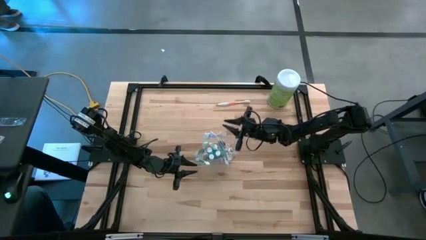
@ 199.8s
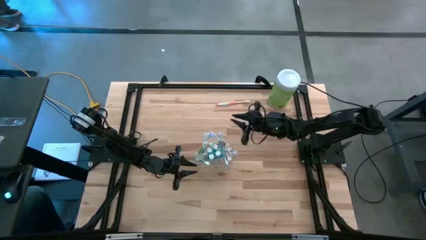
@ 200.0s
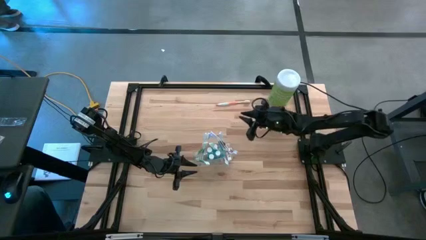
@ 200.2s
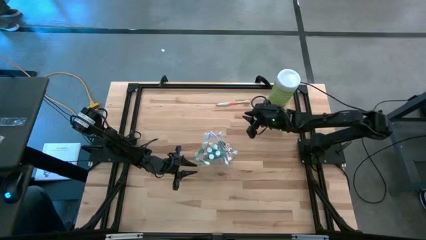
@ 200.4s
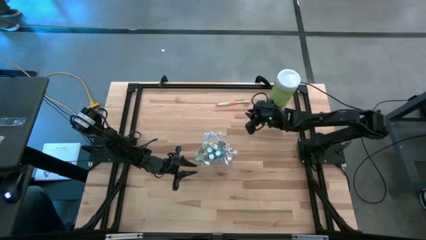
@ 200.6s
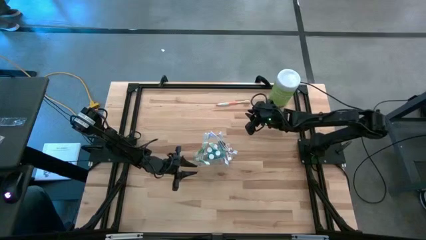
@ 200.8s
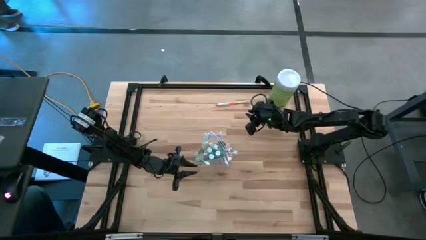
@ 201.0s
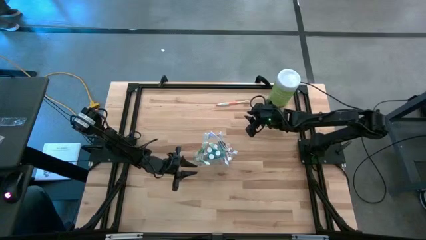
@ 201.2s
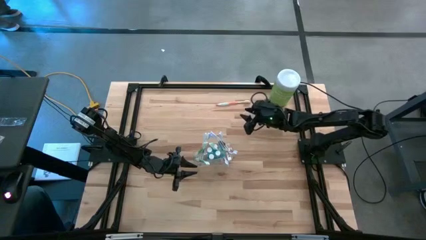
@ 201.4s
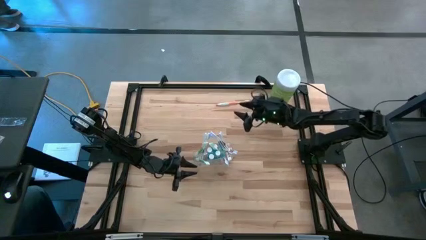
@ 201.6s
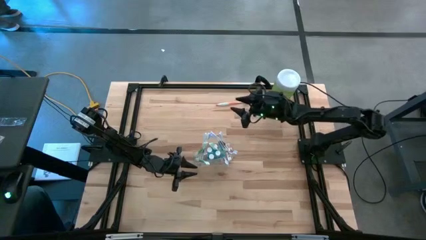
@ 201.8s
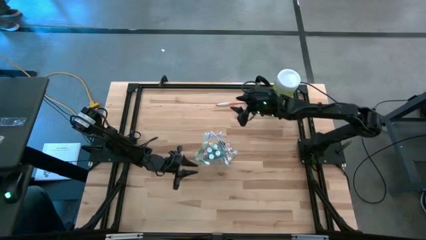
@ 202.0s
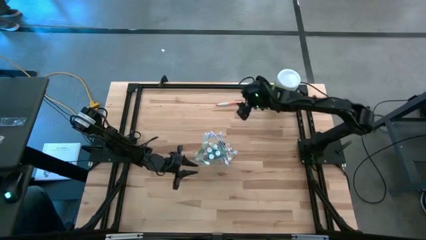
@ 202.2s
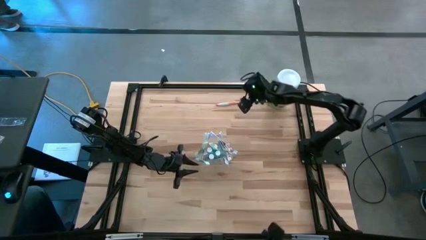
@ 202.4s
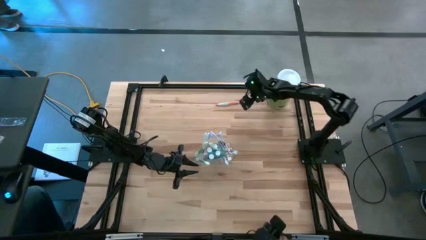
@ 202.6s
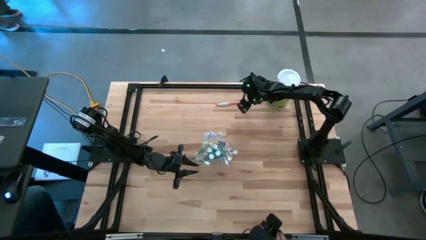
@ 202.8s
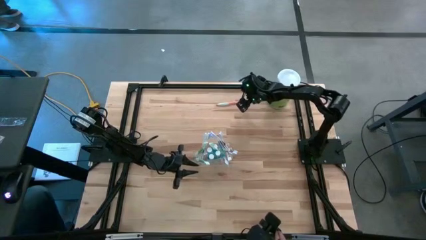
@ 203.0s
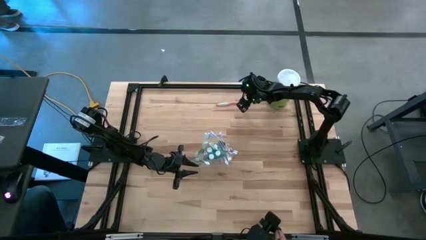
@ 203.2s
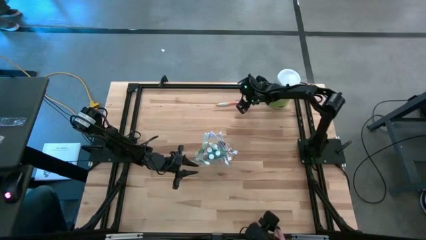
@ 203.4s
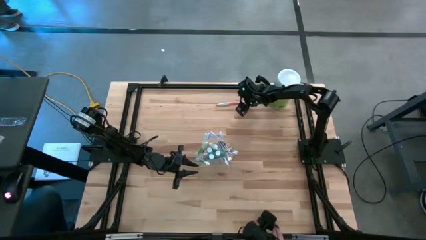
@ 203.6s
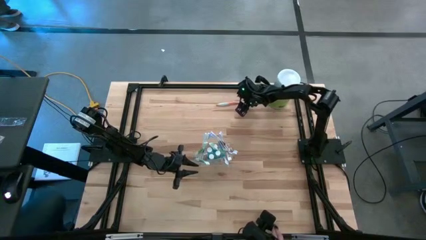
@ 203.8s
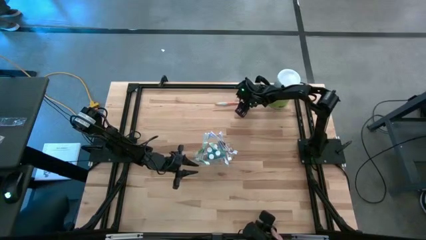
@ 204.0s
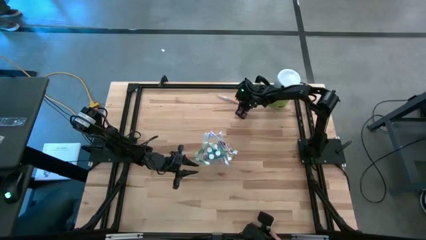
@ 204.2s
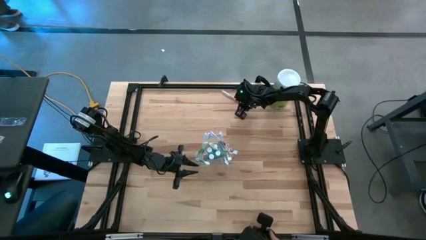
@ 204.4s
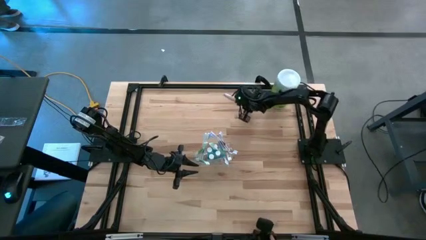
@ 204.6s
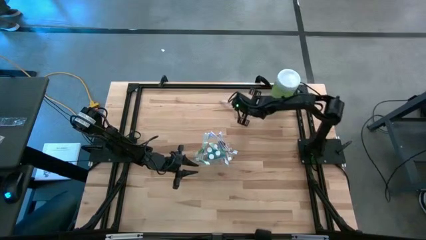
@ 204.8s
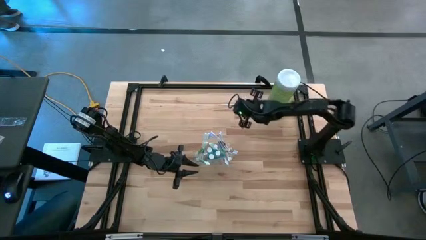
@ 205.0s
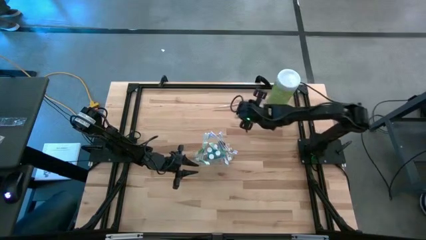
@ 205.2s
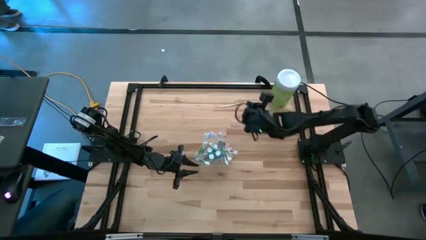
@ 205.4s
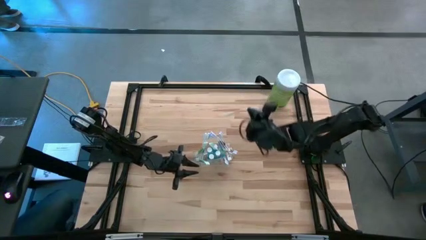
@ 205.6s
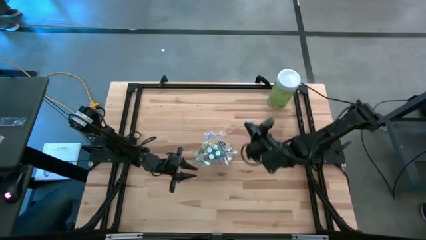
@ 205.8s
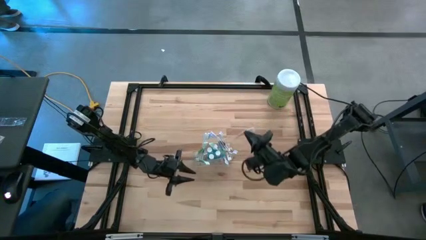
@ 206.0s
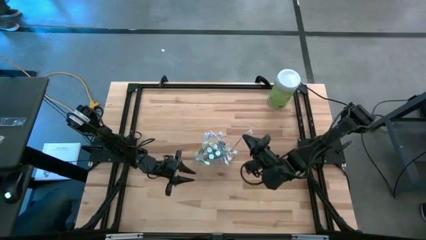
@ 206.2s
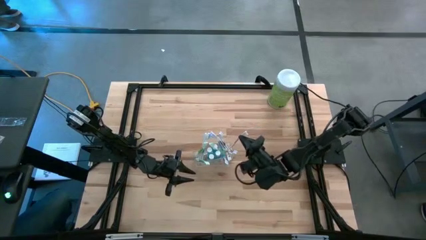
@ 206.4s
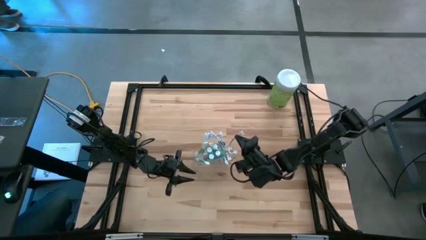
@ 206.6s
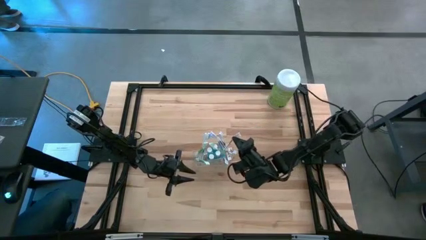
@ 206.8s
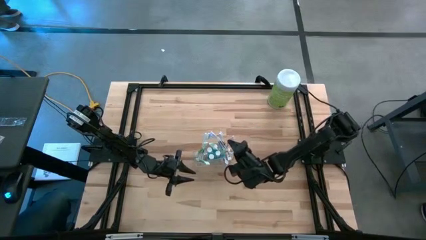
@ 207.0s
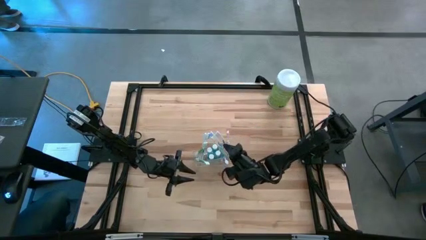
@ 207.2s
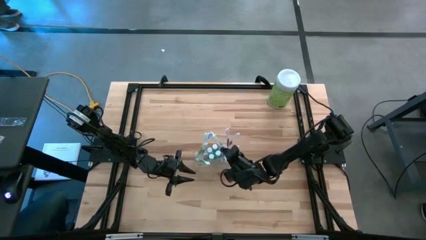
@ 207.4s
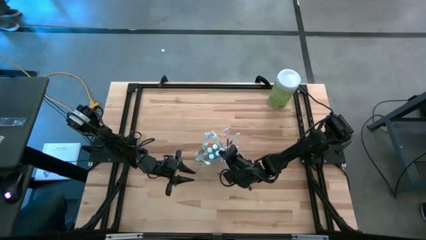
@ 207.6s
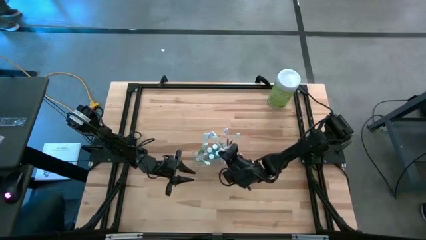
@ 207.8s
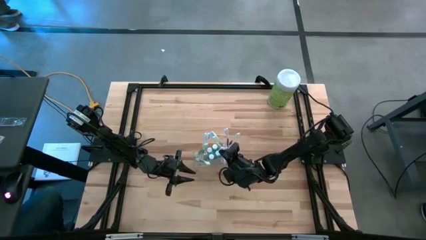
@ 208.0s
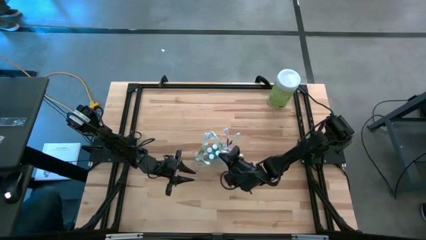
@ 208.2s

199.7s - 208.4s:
Task: Pick & Place toothbrushing station
Put the orange toothbrush into the left side of the transparent organizer

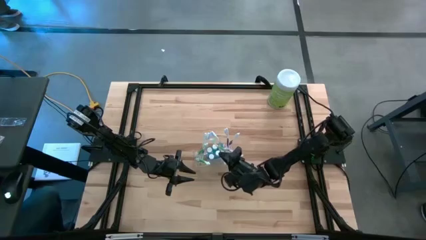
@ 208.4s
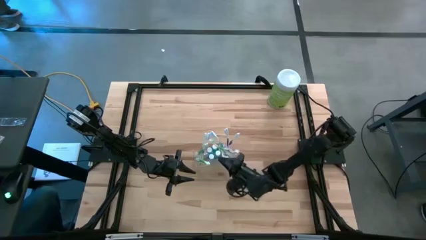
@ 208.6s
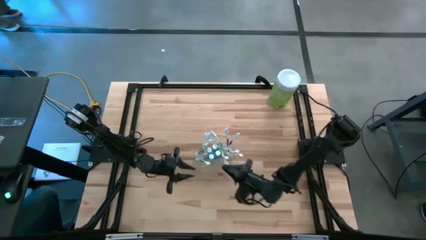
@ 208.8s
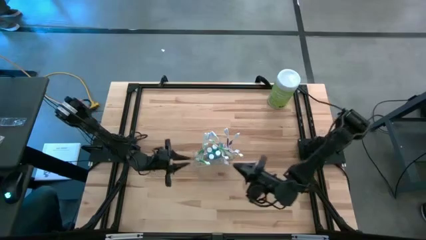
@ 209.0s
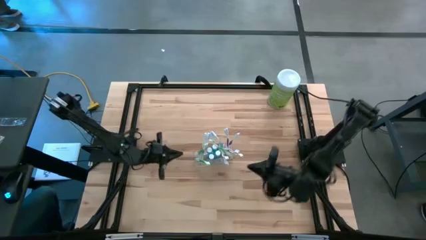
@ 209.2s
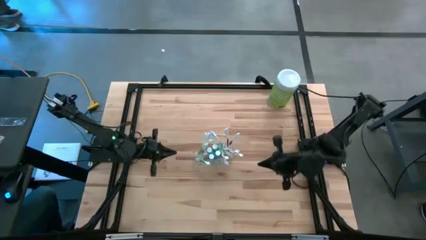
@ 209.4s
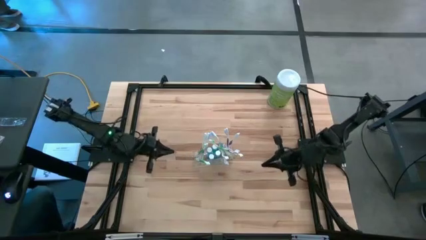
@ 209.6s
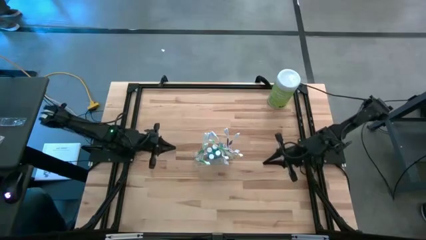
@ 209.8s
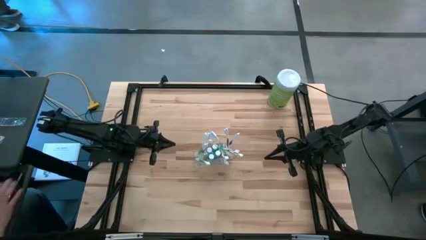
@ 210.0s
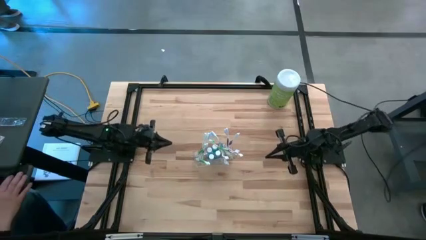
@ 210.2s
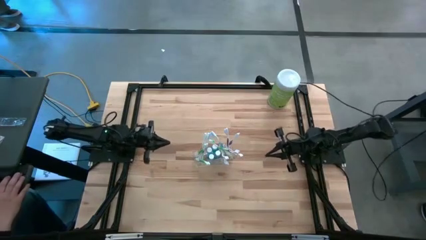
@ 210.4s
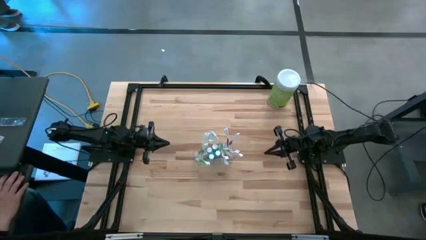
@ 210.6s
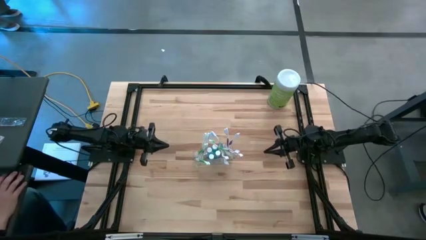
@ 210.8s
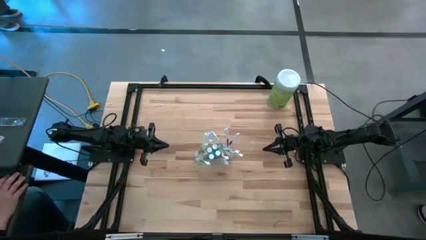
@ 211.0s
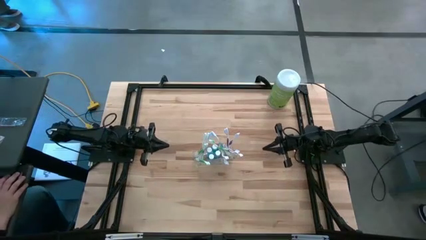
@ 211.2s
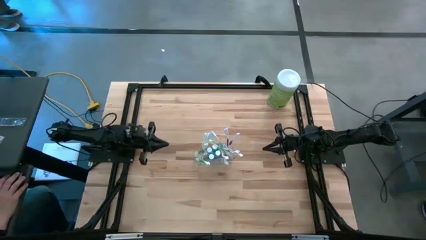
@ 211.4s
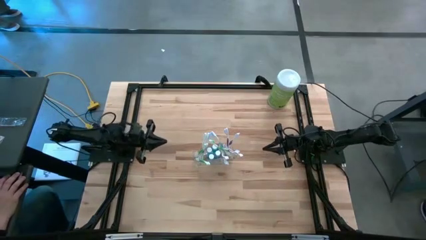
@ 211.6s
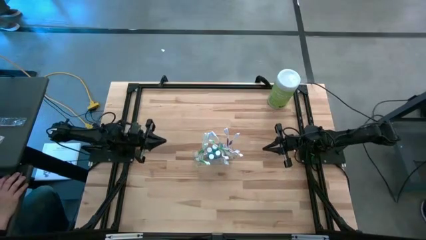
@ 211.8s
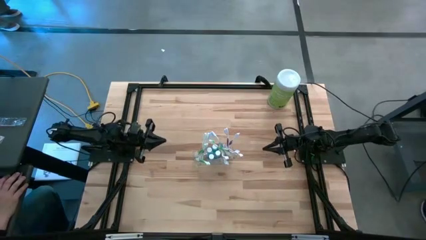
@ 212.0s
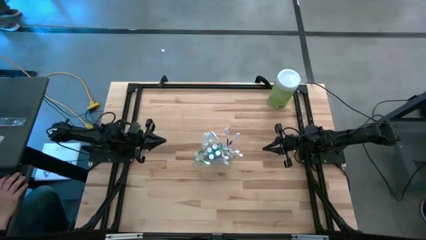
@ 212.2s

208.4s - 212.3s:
Return to Home Position
